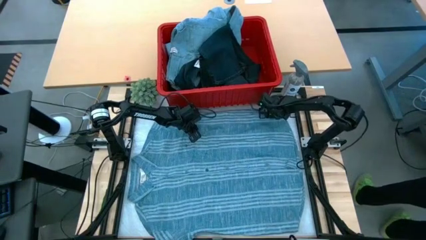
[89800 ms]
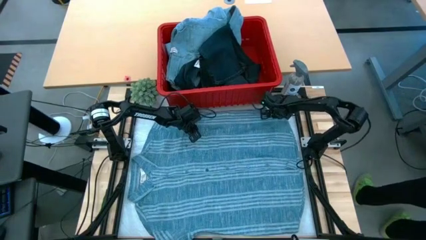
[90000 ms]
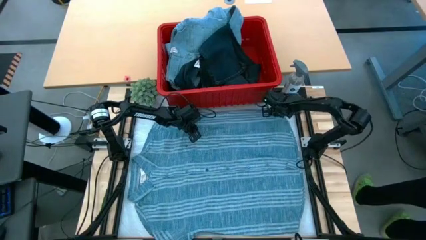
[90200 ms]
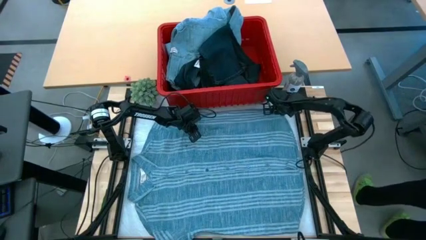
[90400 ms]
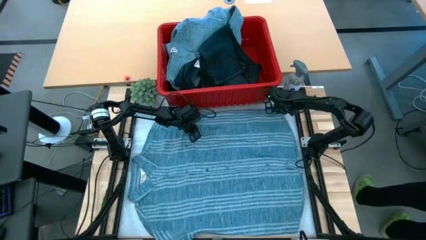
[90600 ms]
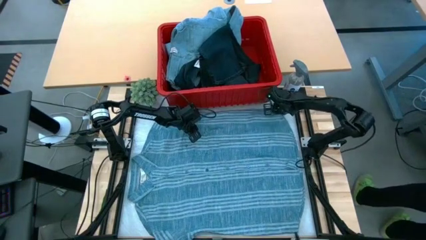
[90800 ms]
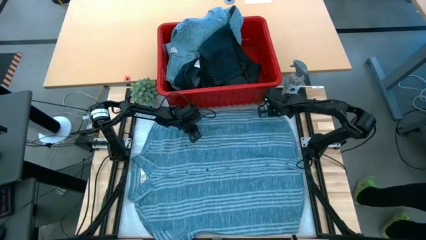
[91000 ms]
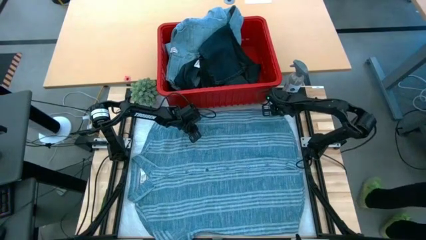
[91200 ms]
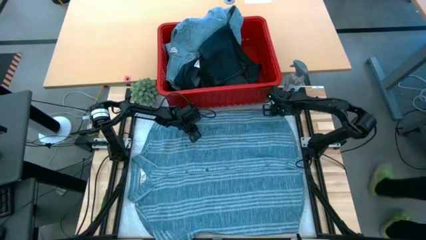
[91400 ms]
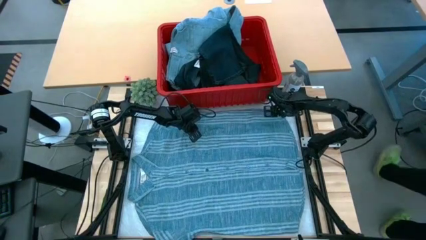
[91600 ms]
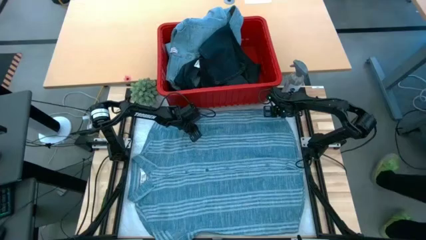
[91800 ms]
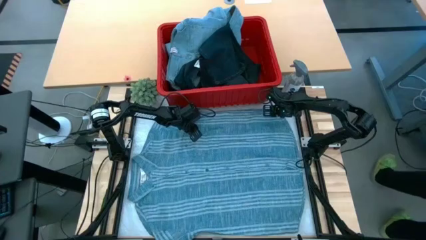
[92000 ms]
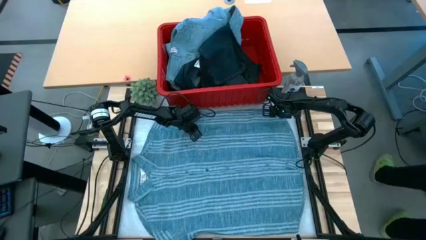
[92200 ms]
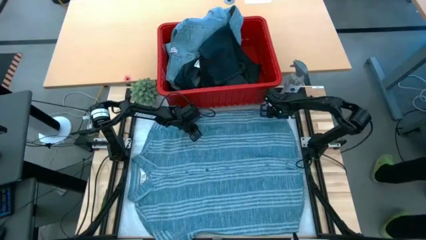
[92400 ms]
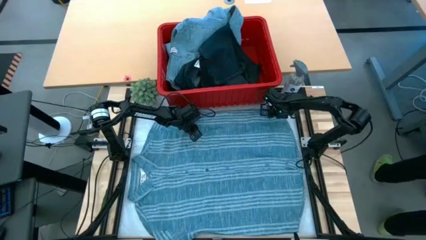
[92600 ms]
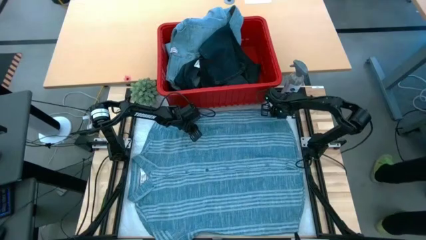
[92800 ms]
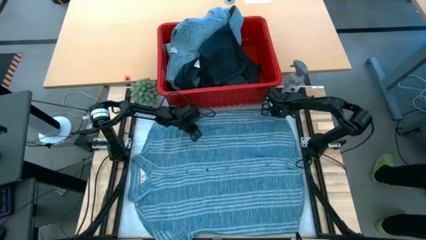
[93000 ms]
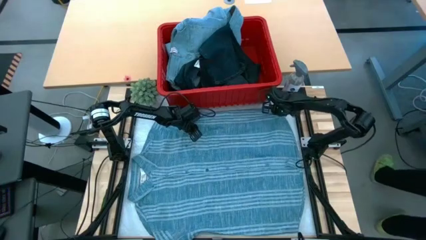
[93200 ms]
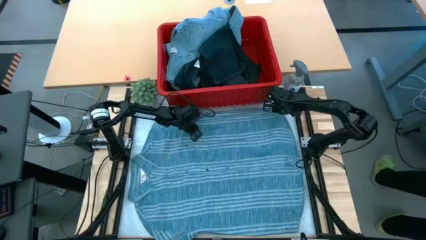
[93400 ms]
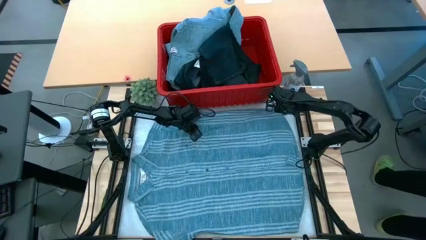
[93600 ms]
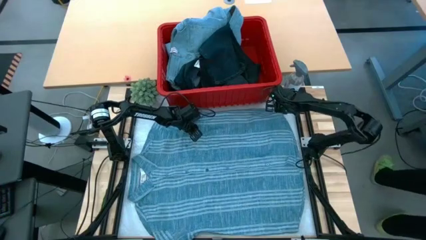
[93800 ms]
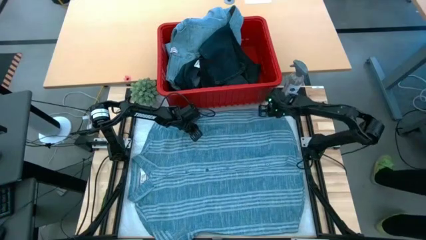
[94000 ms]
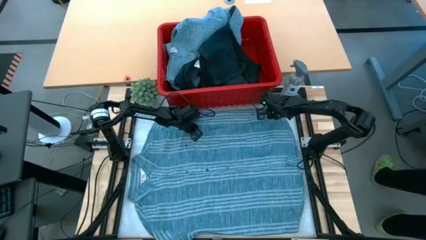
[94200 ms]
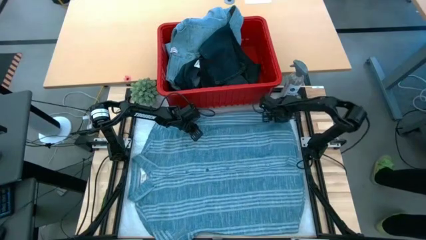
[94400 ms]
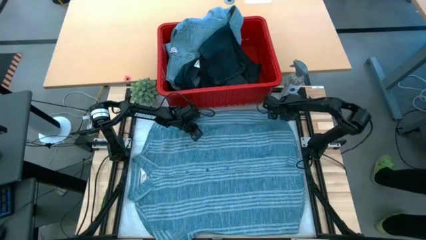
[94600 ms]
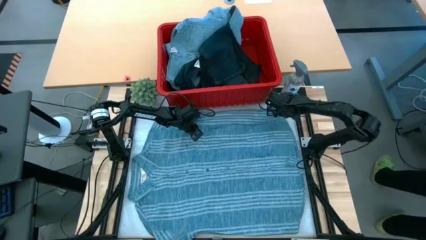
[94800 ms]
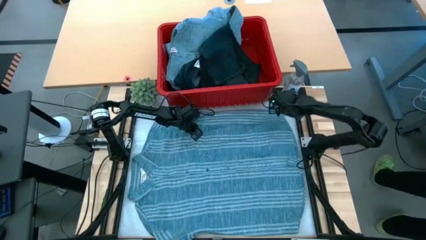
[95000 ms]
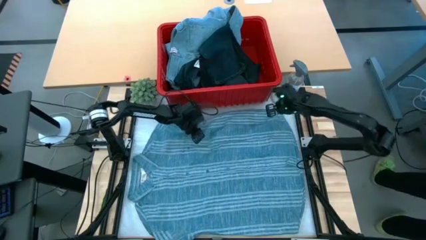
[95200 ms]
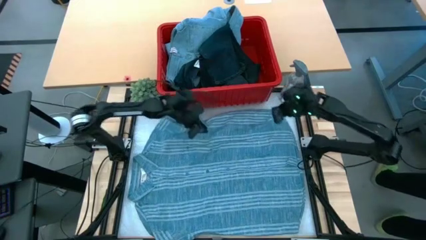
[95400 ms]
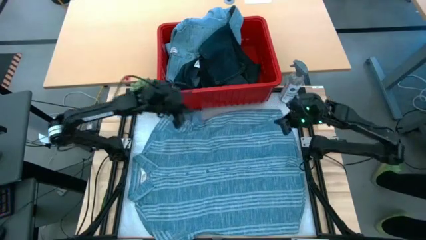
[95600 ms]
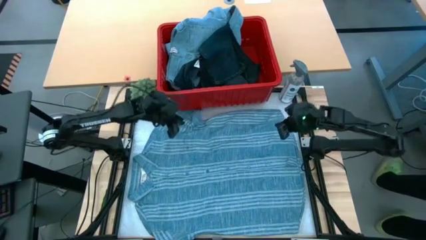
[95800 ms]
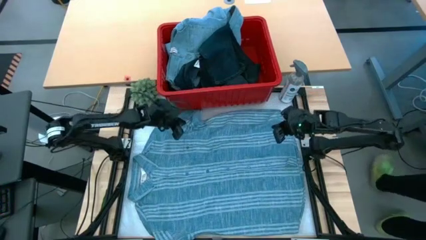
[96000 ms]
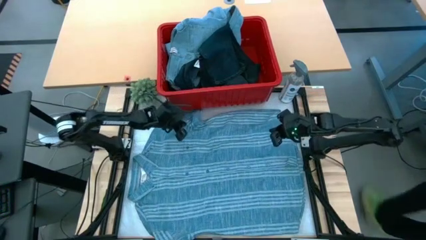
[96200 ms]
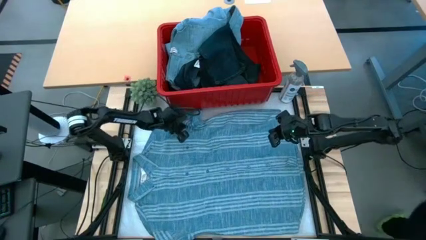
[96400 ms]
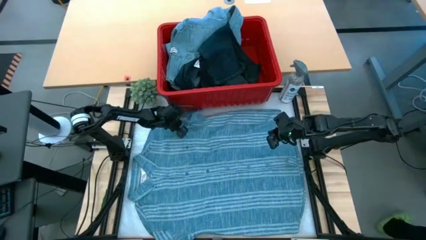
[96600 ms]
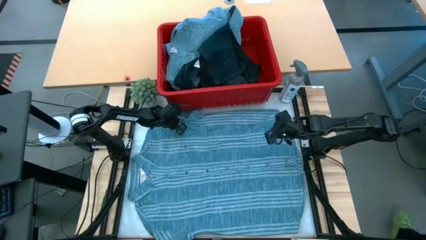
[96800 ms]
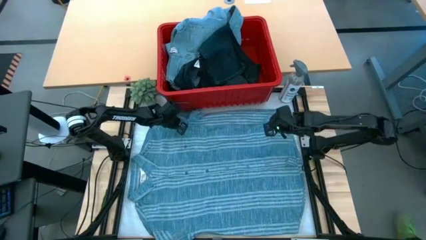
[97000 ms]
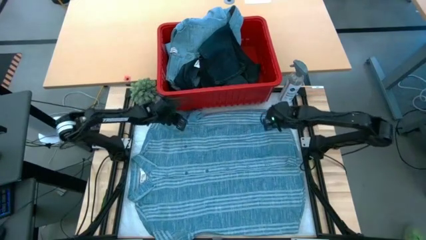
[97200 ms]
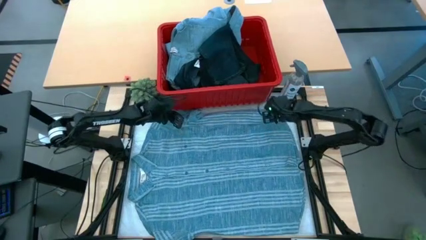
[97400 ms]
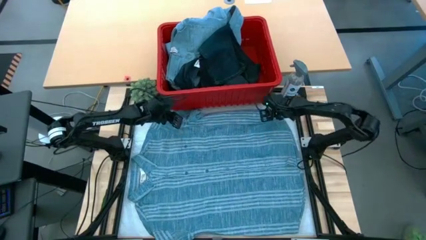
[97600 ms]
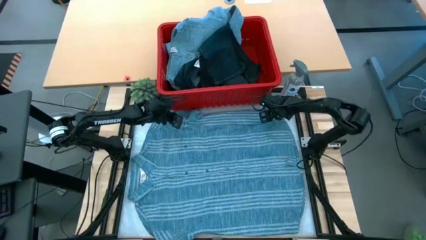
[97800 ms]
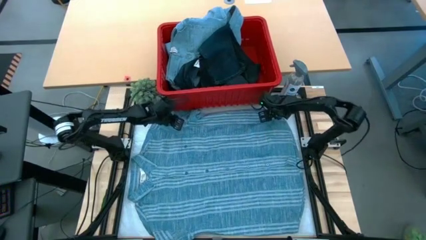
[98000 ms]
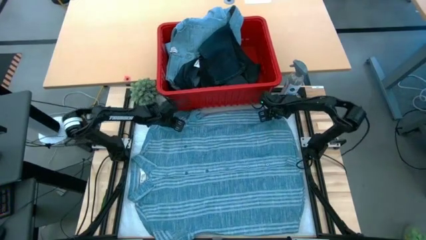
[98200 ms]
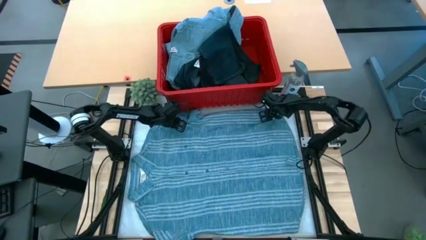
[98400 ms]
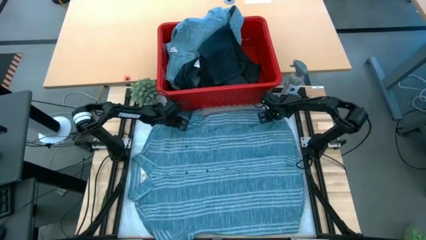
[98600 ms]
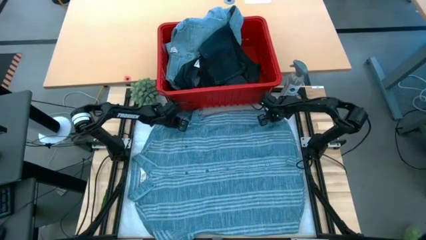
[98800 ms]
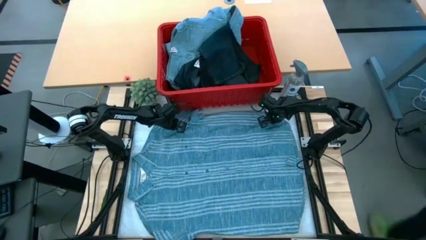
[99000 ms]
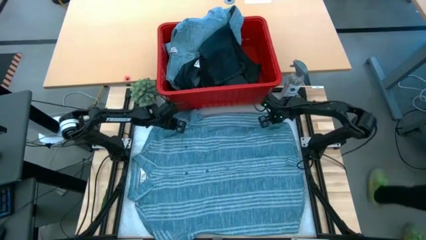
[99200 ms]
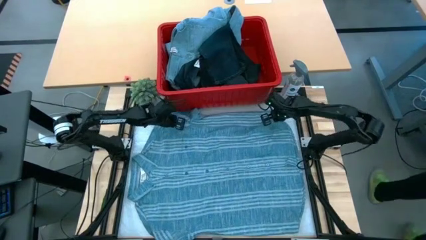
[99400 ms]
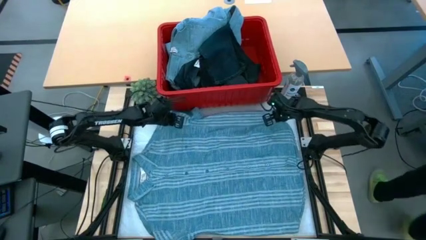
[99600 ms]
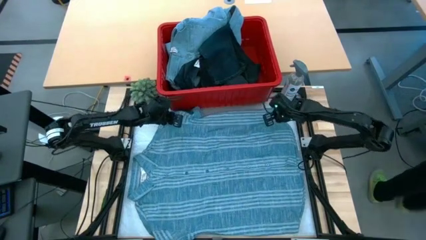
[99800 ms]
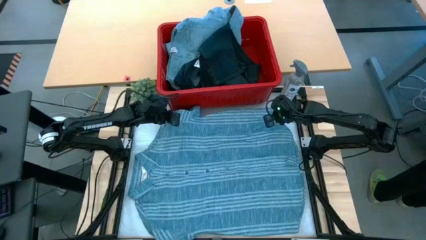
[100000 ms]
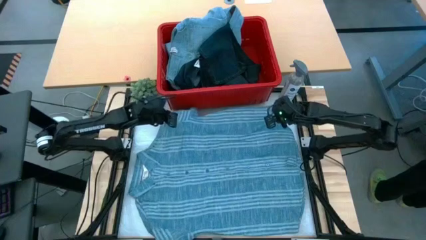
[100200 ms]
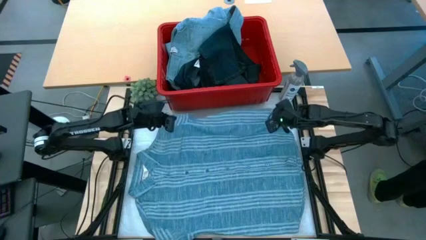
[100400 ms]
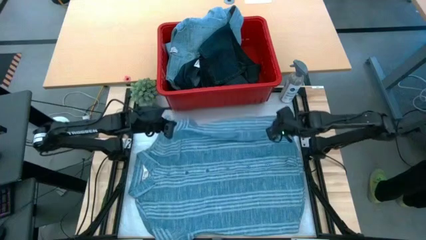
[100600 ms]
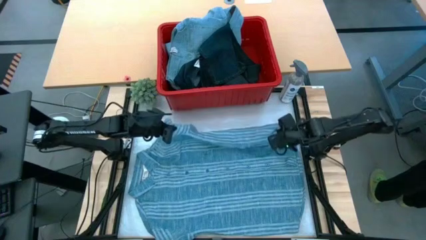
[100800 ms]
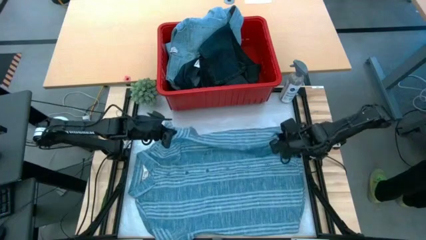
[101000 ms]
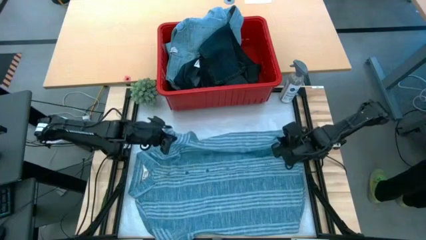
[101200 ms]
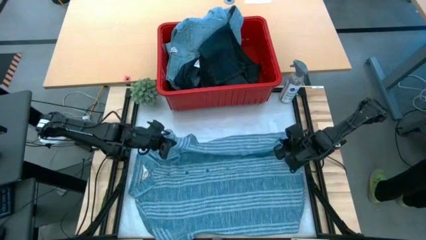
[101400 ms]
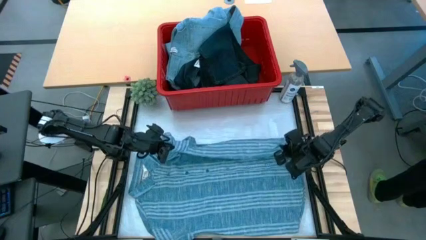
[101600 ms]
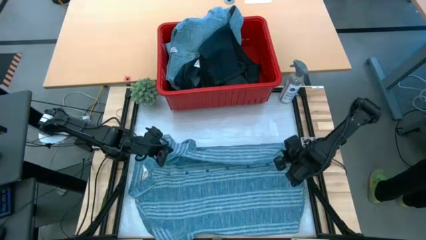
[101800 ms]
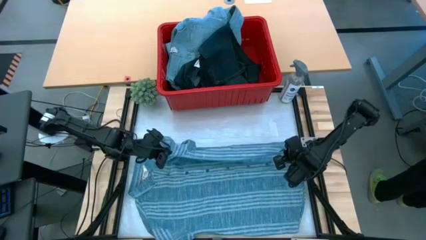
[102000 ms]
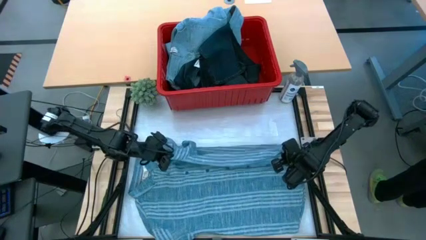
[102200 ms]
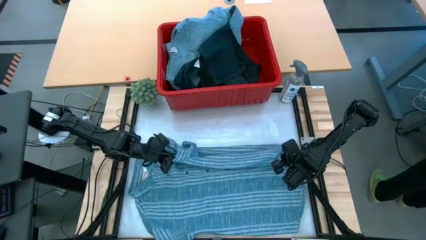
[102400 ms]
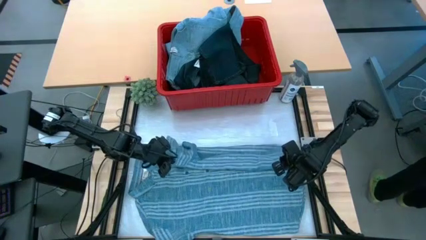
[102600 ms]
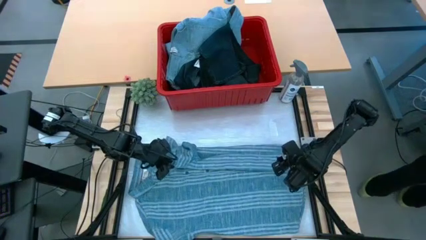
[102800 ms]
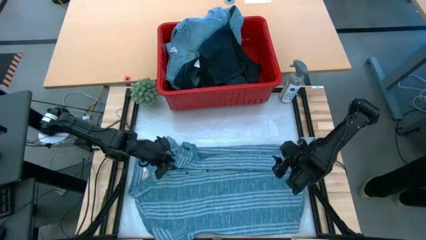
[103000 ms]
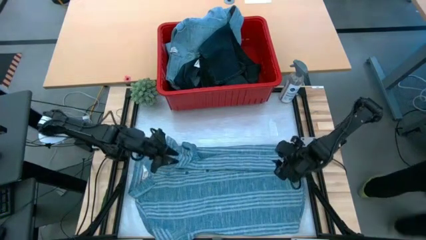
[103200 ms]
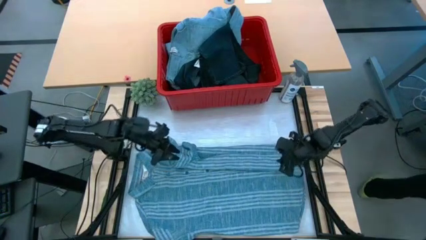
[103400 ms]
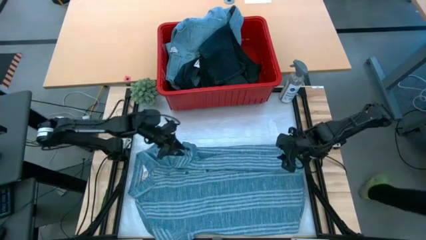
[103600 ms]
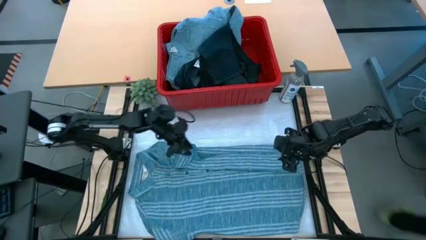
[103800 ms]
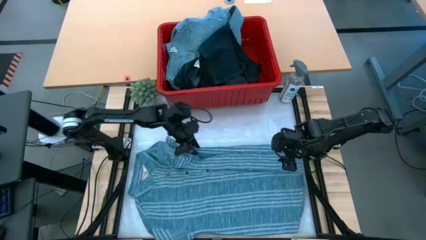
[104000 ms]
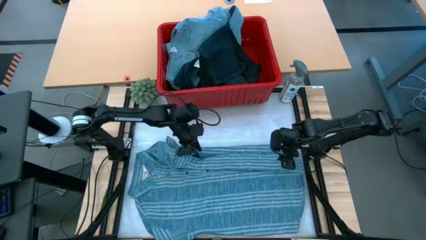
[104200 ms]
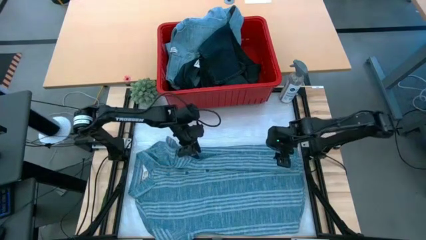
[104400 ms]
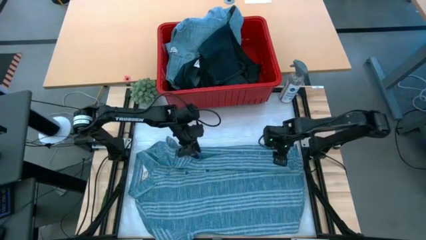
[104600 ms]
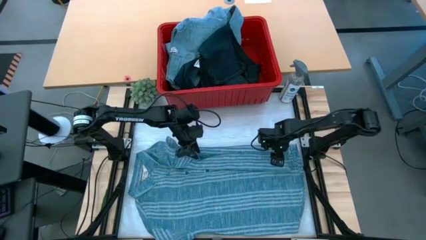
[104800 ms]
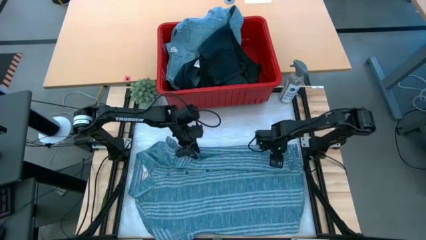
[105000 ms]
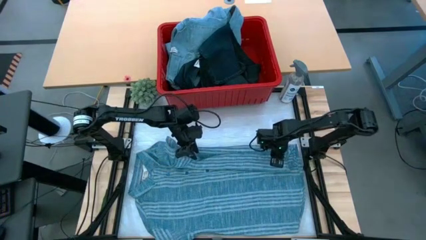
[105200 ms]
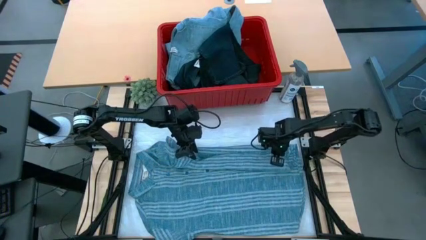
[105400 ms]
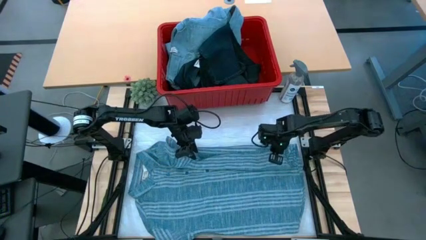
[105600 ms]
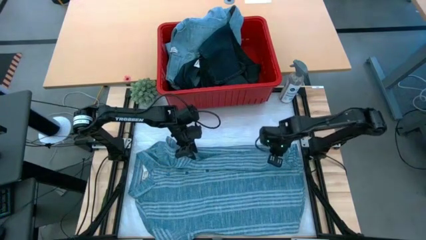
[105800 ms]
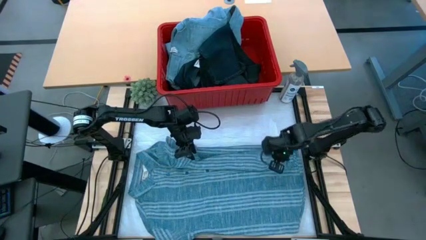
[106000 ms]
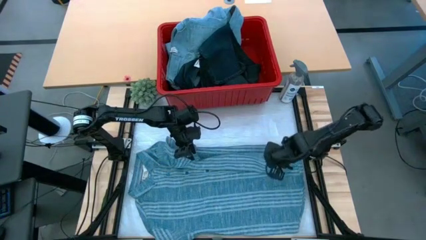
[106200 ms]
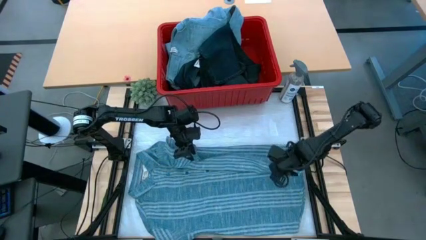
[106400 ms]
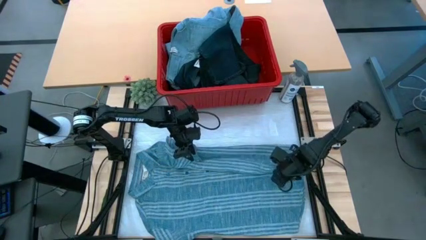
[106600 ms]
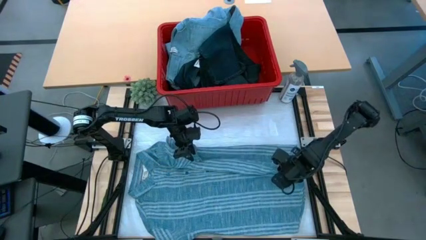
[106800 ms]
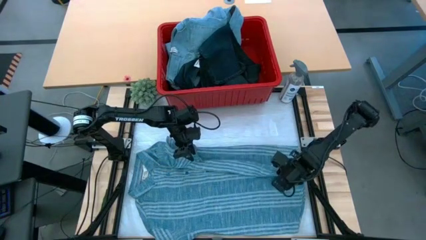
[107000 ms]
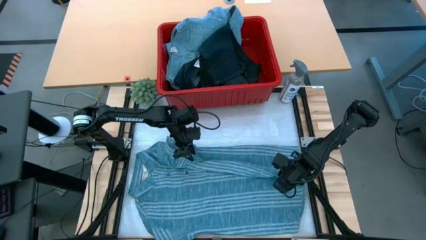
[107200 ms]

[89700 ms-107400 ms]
Task: Fold Laundry from Bin
Fold the blue polo shirt
